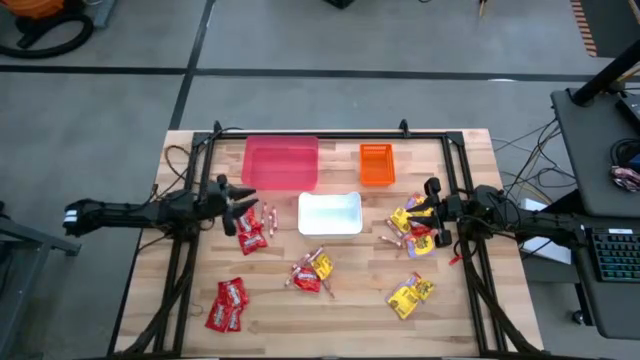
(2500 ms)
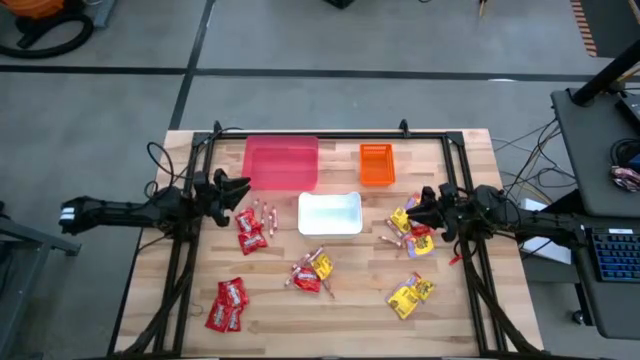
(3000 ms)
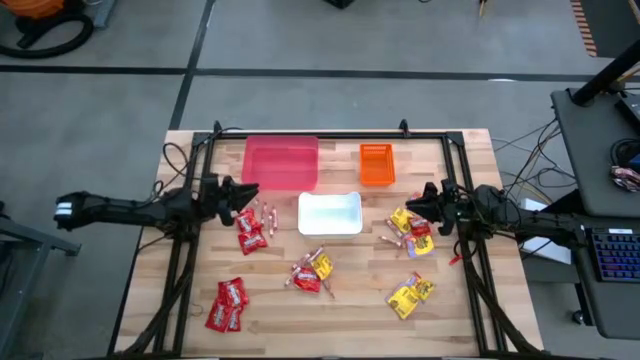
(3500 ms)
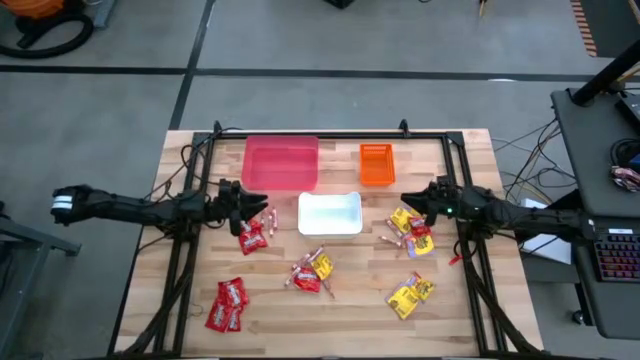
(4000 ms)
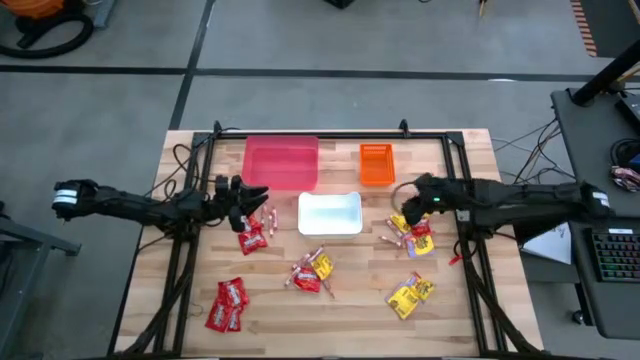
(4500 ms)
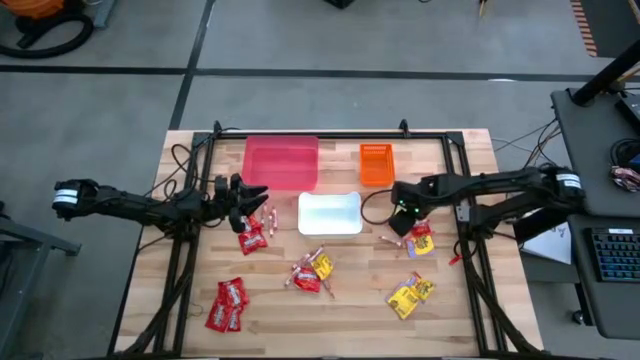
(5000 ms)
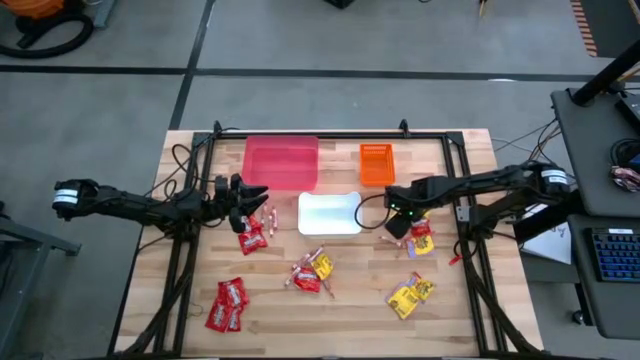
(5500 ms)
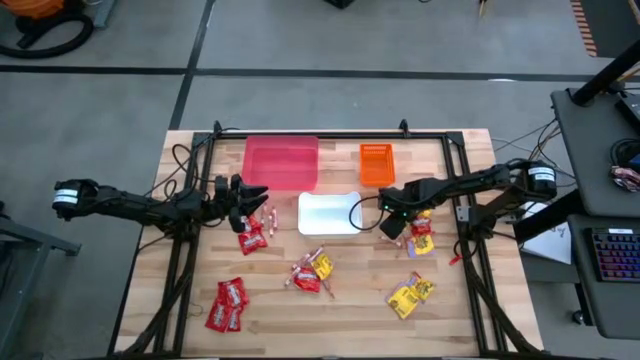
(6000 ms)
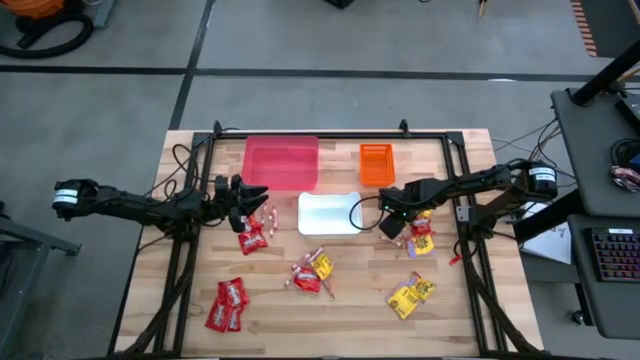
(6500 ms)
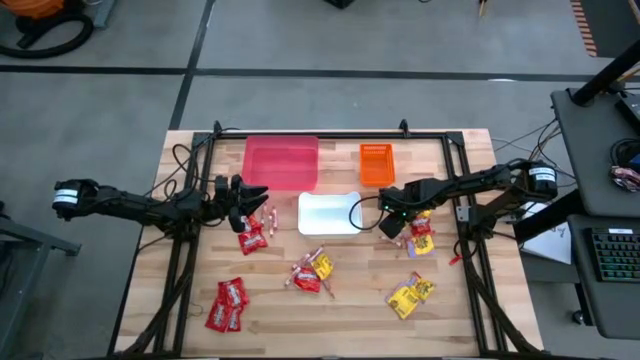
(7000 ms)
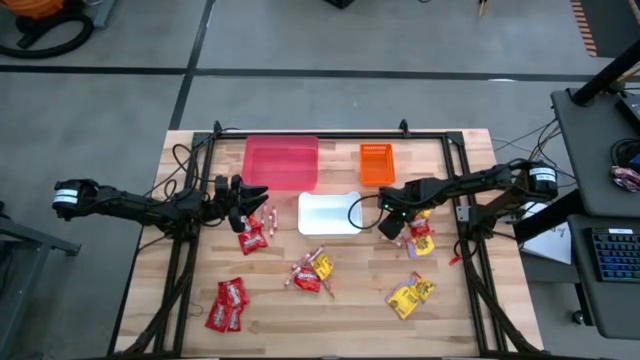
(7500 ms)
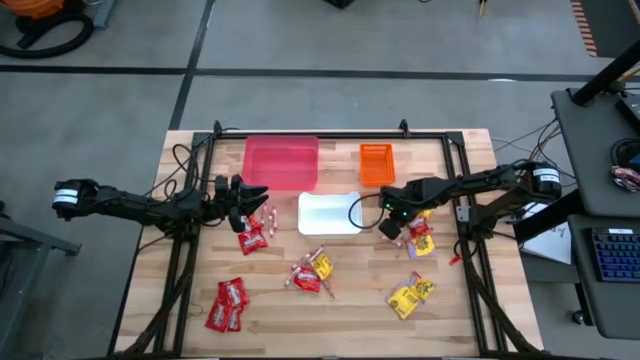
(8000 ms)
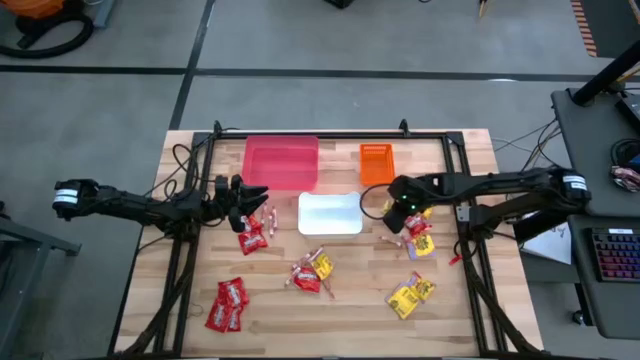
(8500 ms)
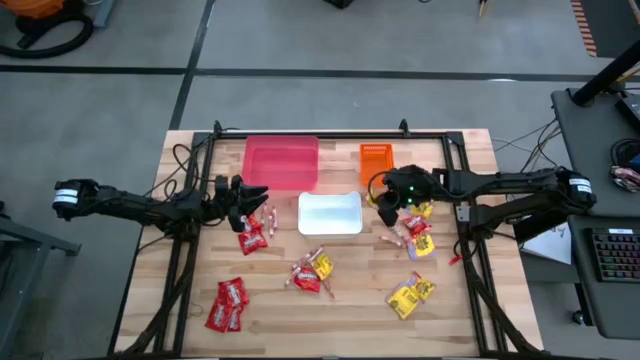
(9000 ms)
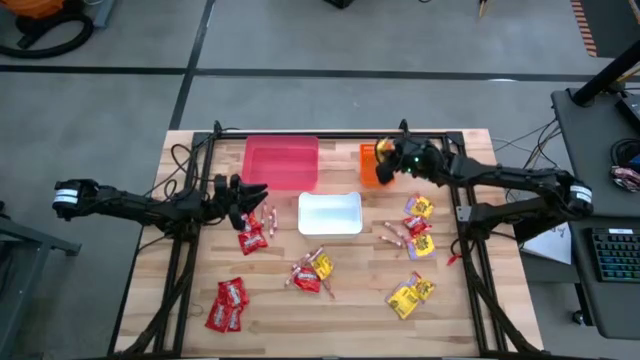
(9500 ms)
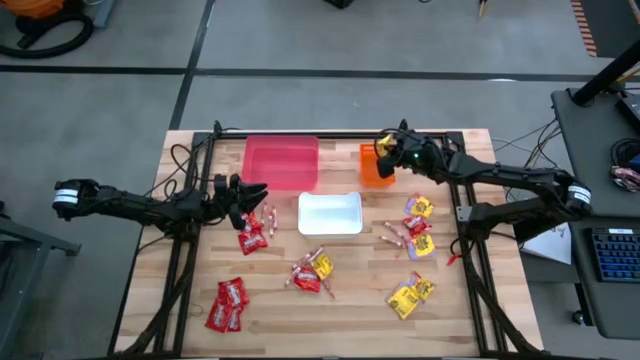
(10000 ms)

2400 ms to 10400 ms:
Task: Sort candy
Put the yellow candy into the orange bin

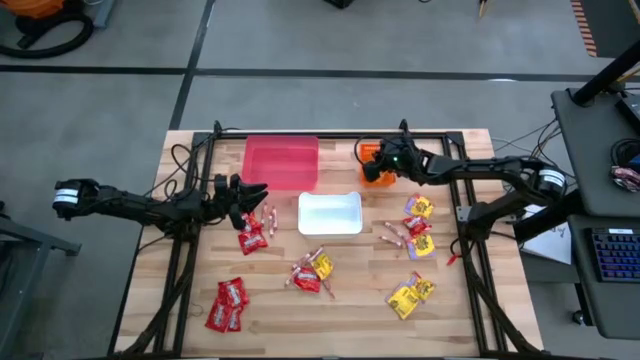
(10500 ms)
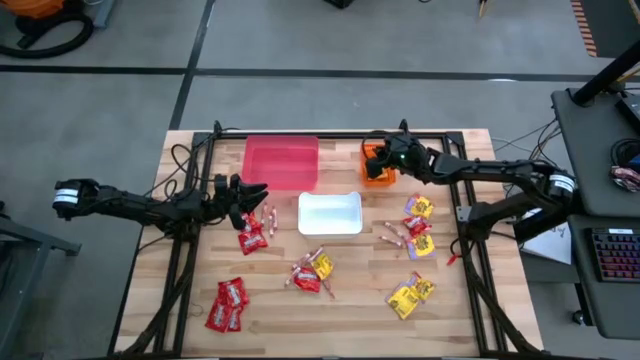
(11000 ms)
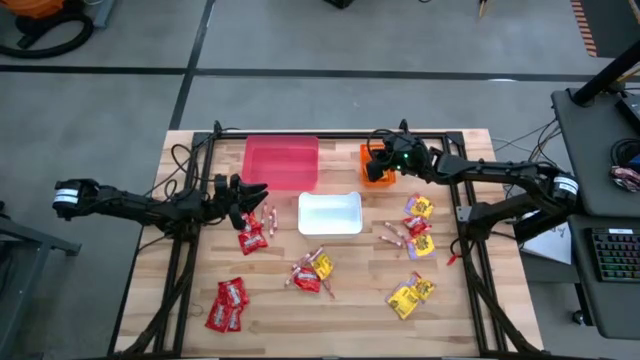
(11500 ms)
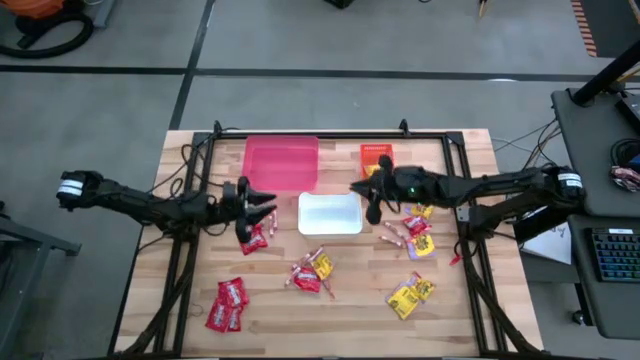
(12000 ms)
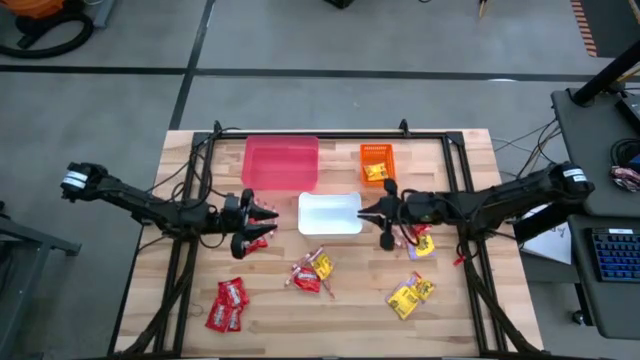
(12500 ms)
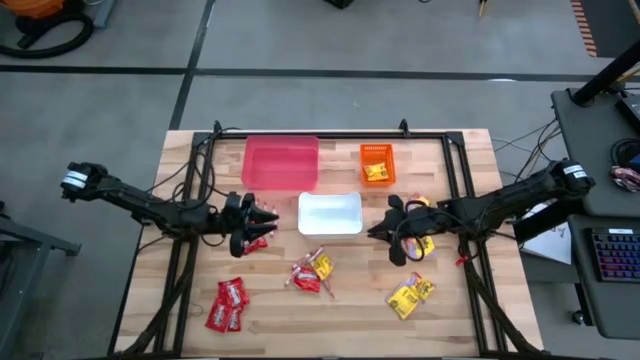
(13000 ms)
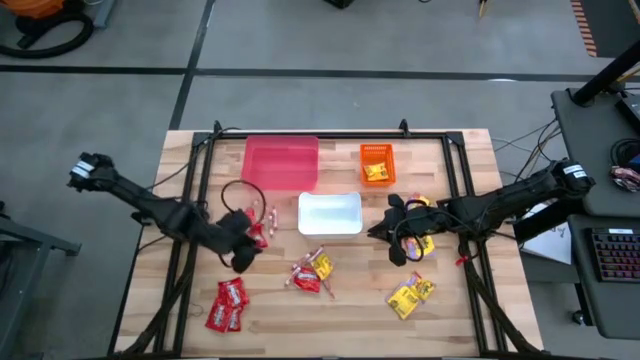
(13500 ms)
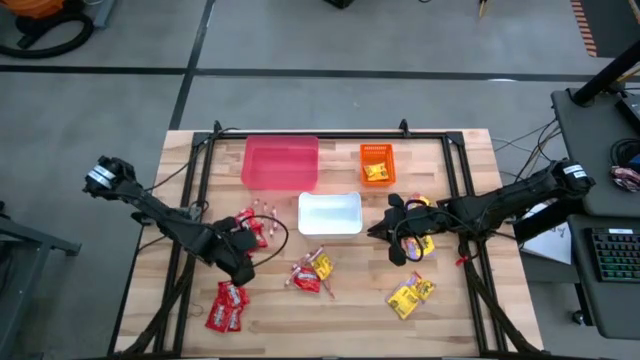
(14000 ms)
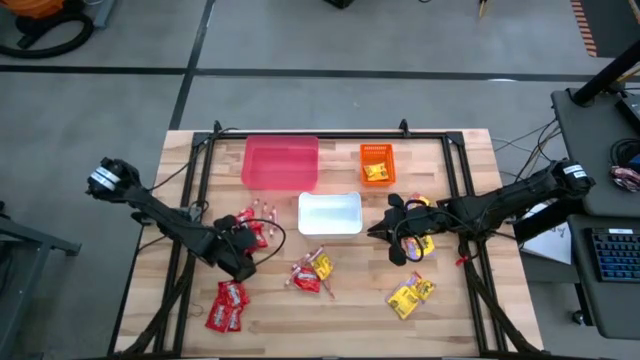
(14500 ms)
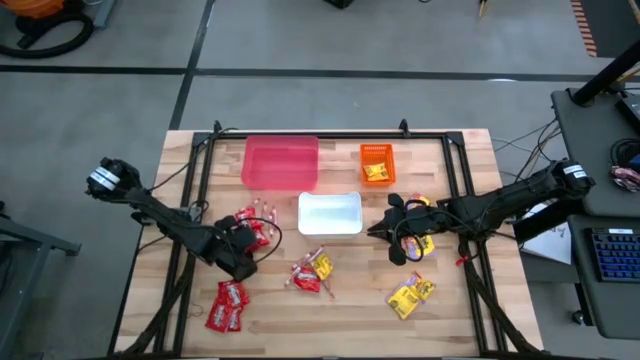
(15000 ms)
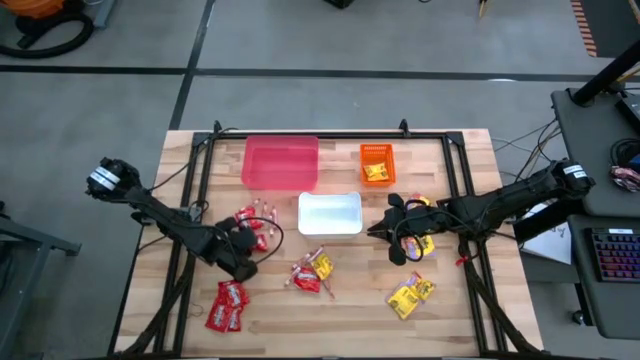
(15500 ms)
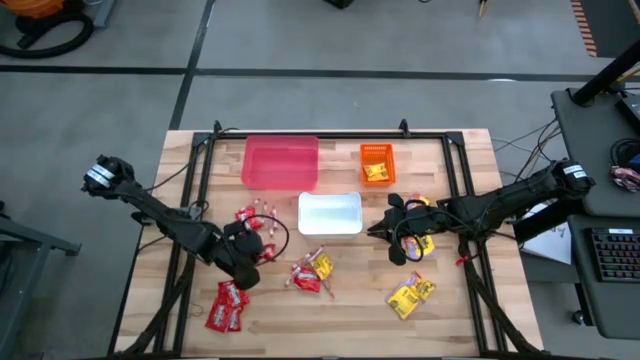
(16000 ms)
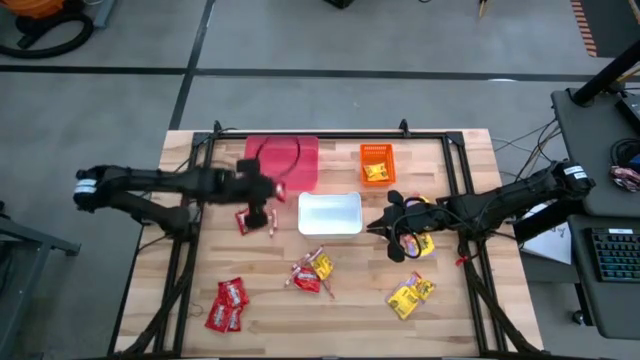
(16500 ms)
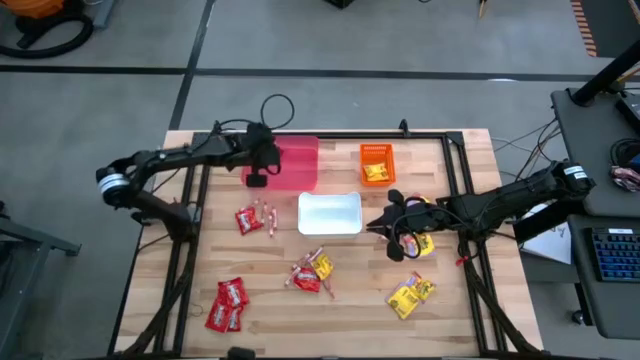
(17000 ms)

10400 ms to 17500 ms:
Put the red chocolate into the red bin

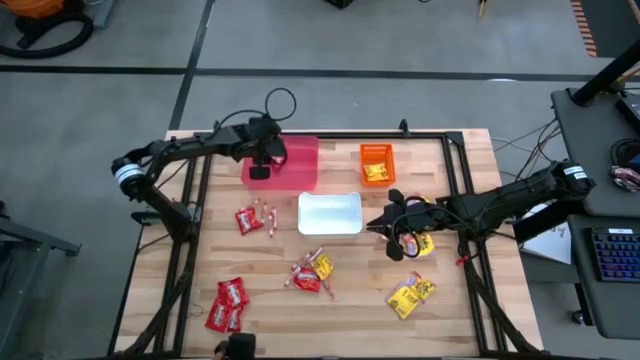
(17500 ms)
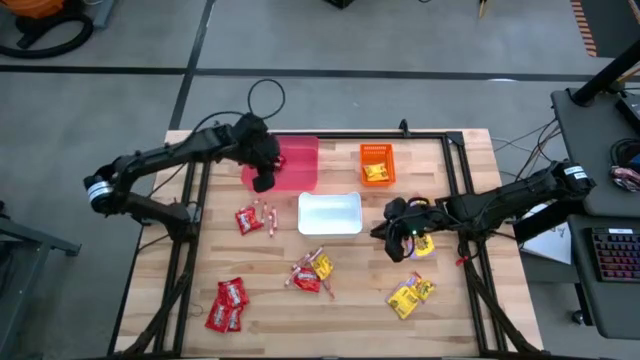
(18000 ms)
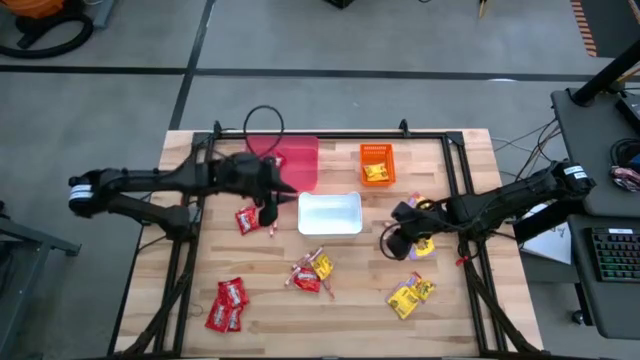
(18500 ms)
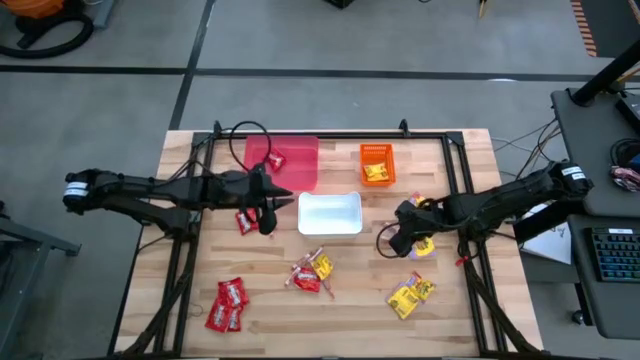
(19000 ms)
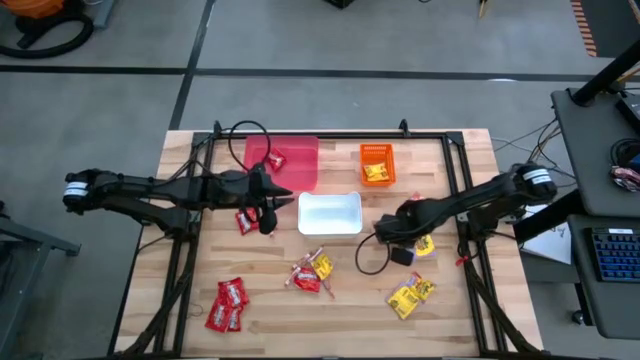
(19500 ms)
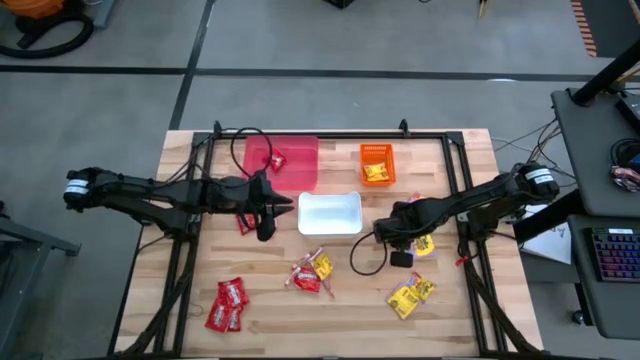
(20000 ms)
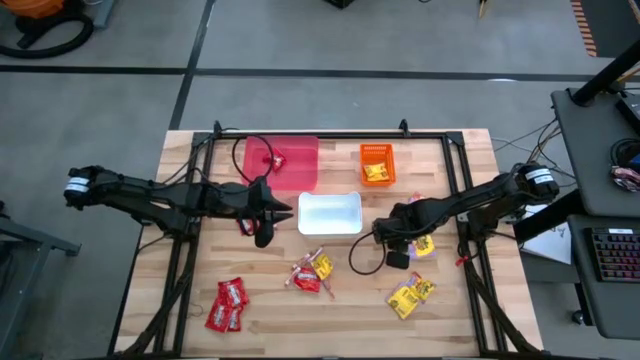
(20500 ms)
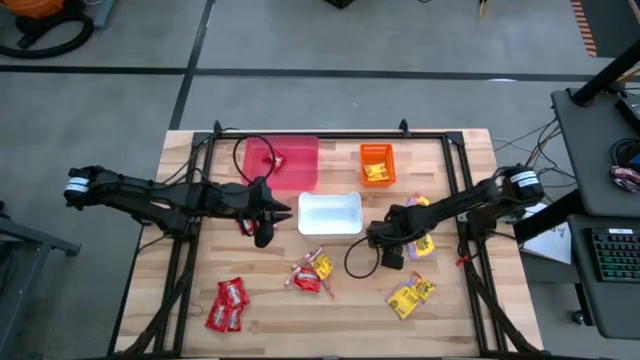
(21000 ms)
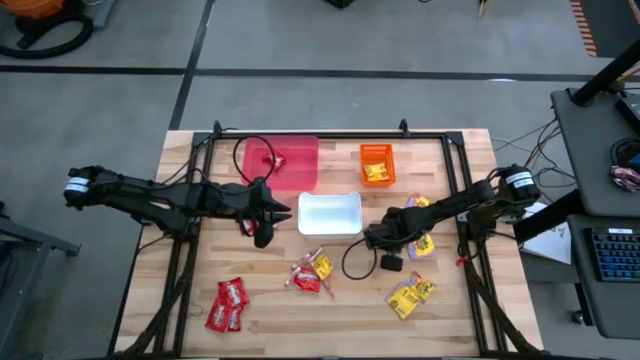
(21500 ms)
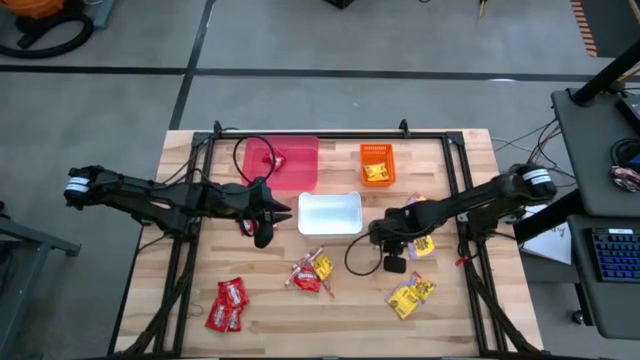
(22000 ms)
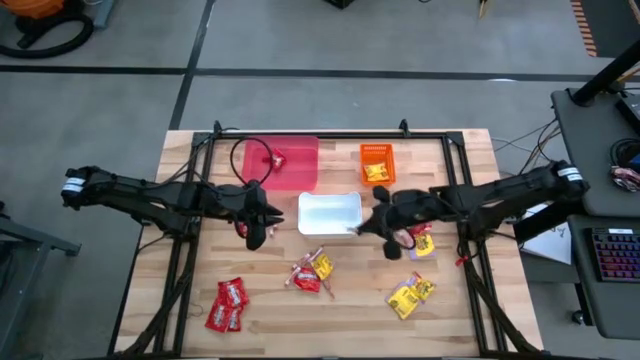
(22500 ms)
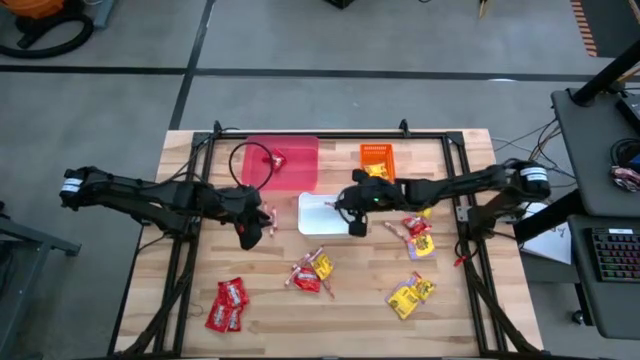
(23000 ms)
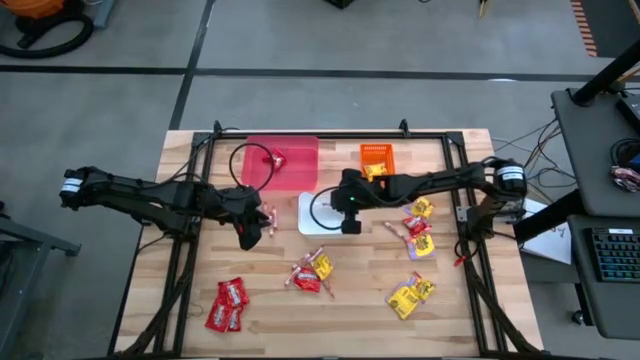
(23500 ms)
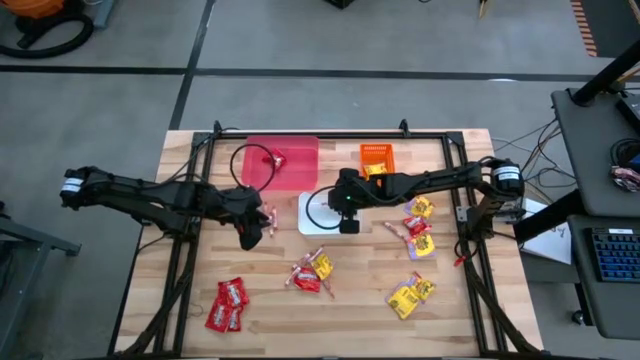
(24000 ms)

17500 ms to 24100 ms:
Put the white candy into the white bin
